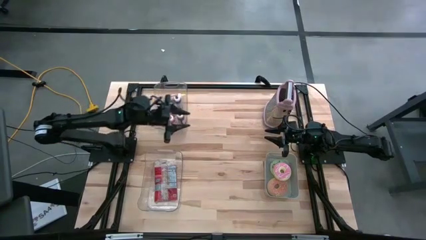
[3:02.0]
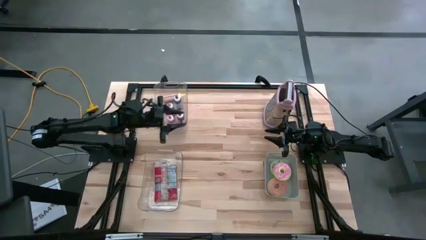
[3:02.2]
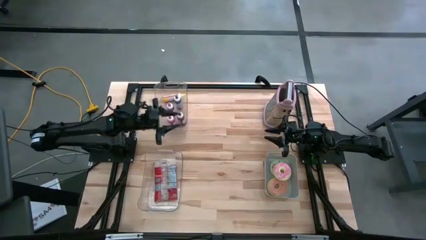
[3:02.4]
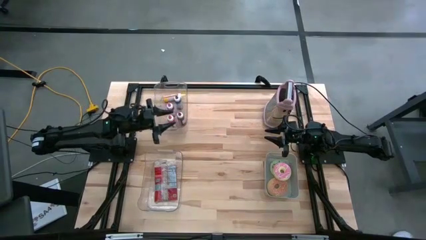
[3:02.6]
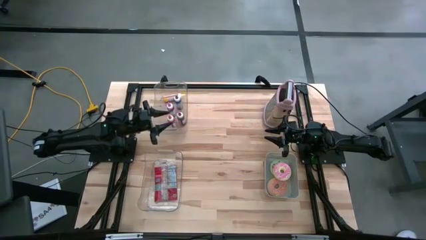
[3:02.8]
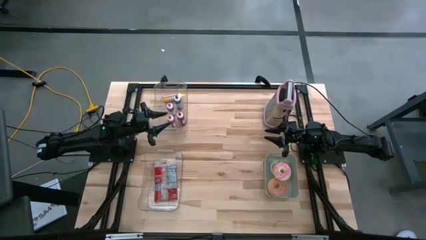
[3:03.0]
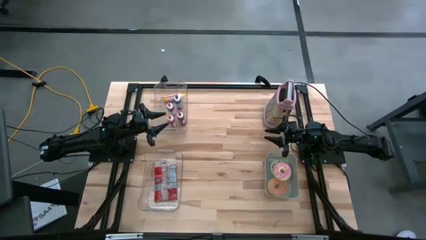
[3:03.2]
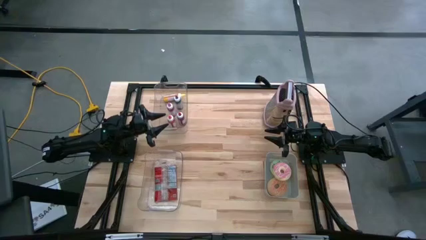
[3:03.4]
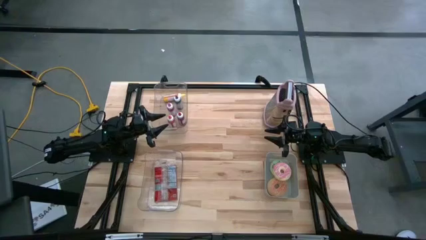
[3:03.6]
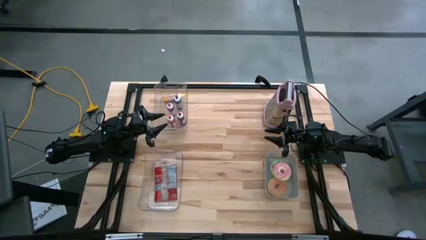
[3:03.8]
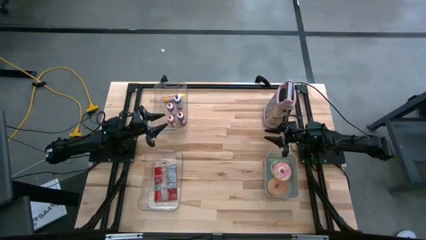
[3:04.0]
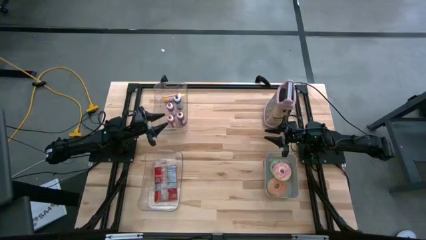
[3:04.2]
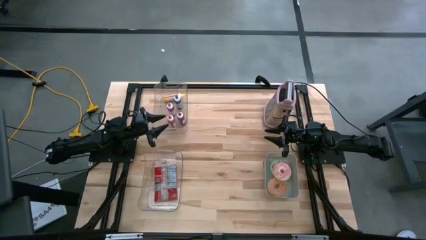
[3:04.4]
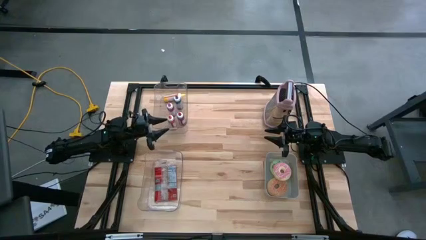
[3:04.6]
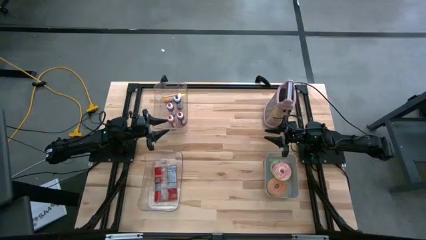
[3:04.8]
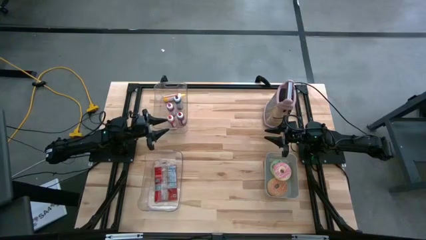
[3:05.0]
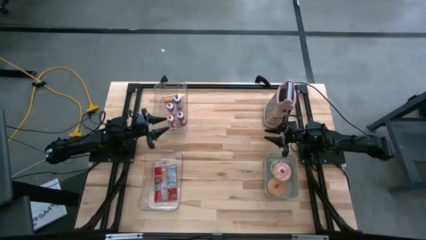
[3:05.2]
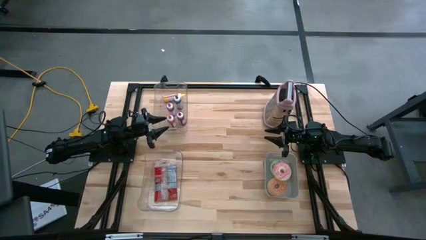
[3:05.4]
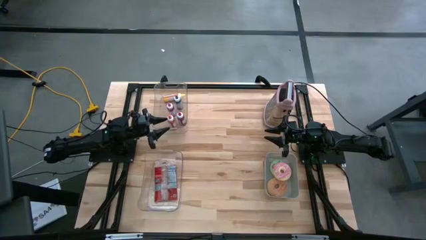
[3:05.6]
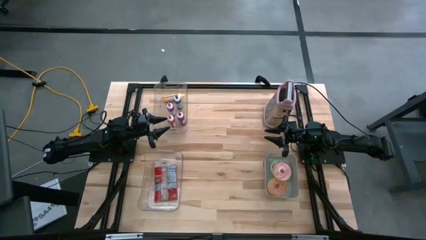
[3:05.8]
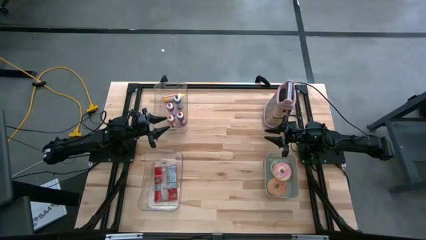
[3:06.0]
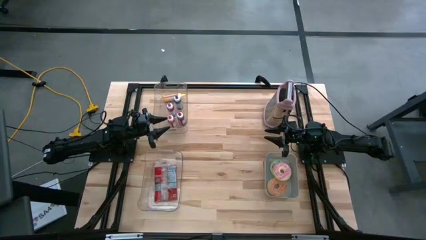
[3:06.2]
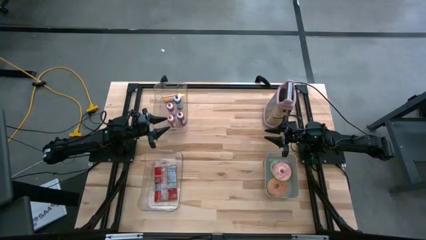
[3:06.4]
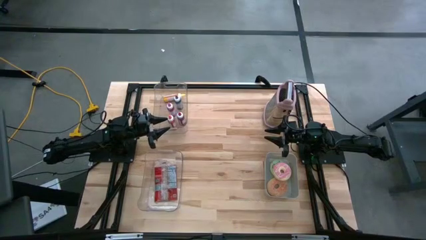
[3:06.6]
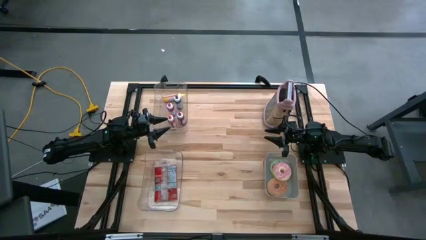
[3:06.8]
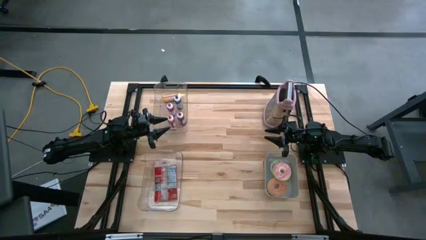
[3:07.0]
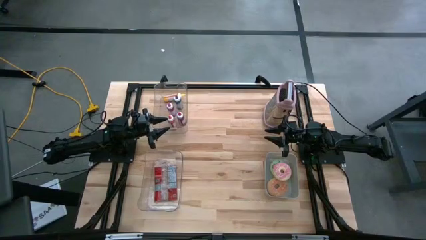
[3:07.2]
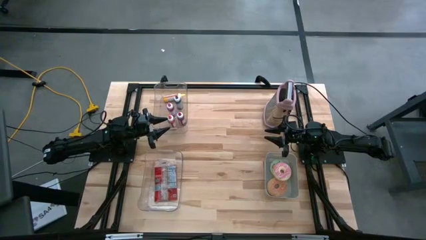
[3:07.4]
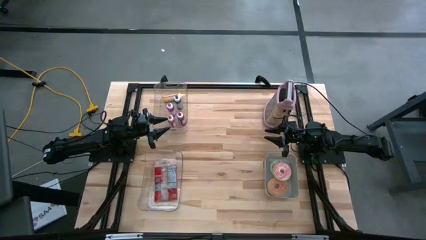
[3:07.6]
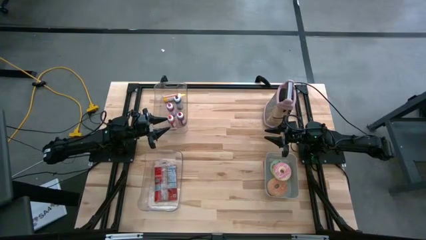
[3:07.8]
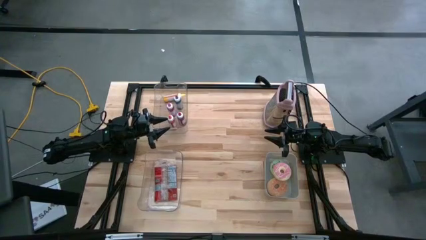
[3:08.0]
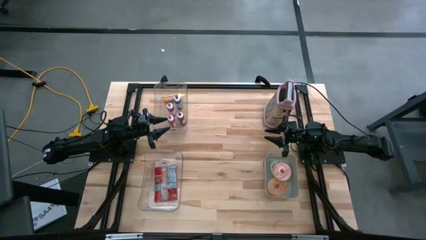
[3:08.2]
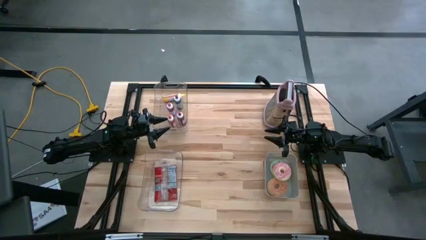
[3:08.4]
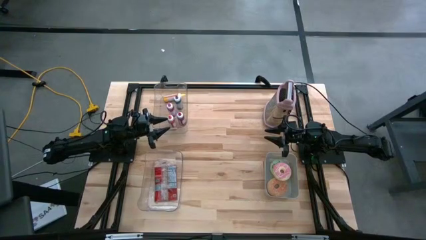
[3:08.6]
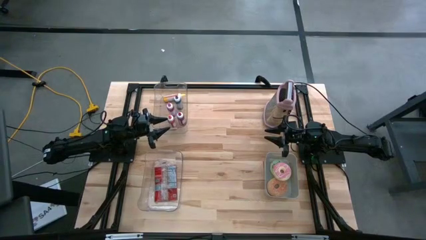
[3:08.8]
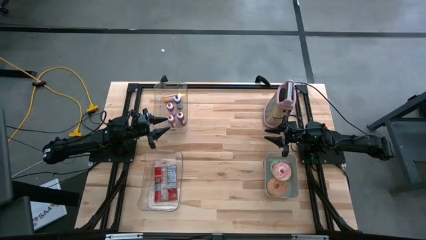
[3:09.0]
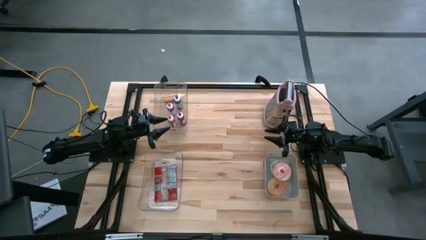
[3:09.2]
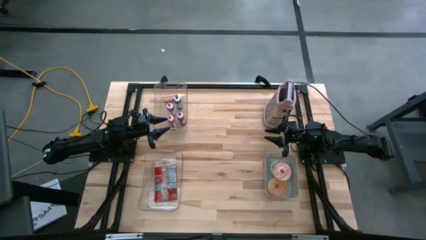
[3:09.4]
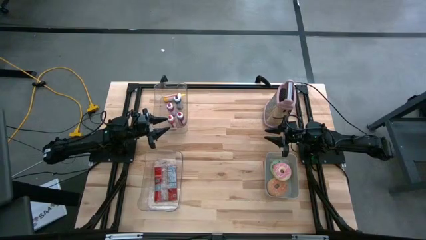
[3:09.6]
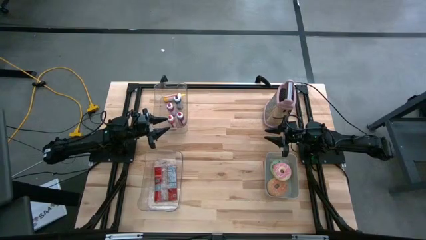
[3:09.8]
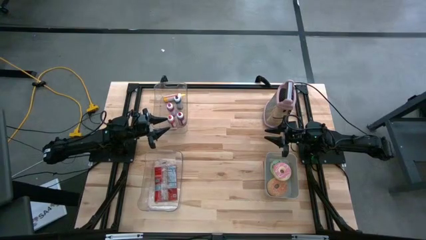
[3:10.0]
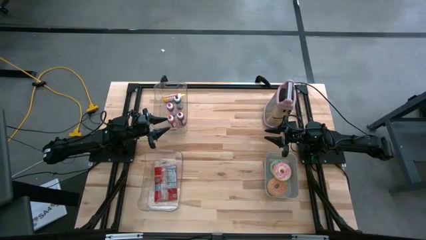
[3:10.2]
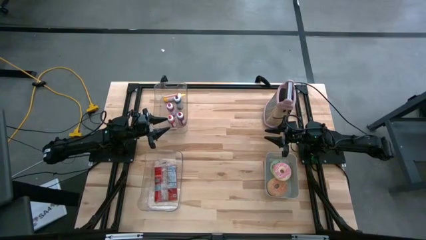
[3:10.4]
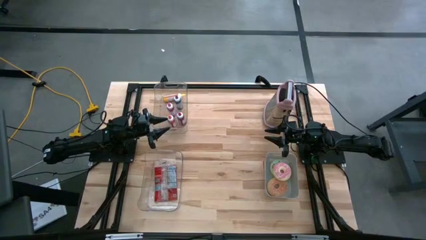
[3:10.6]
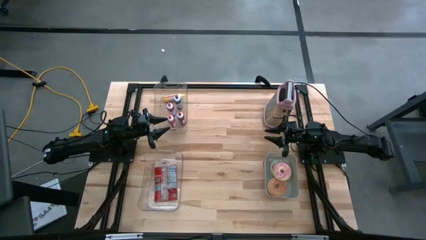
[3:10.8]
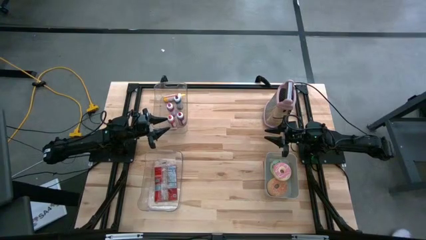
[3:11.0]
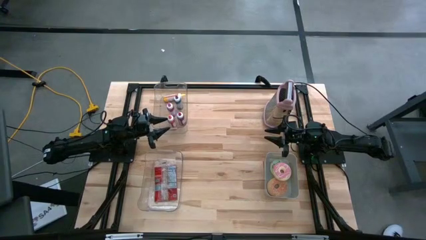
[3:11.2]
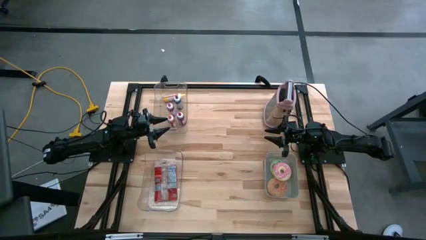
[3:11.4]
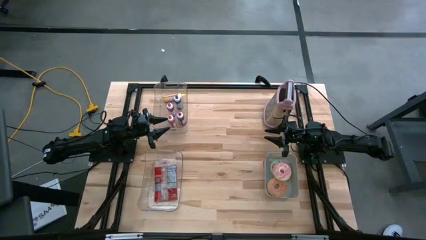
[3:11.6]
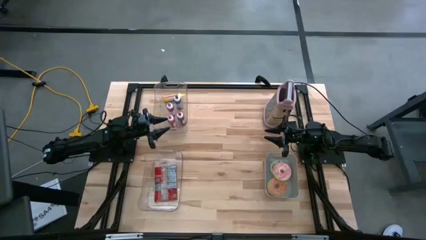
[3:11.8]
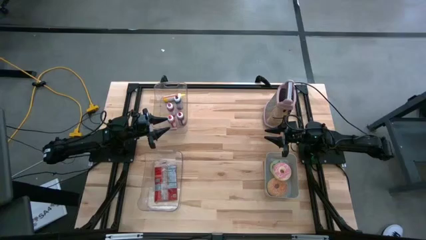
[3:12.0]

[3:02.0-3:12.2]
Return to Home Position
